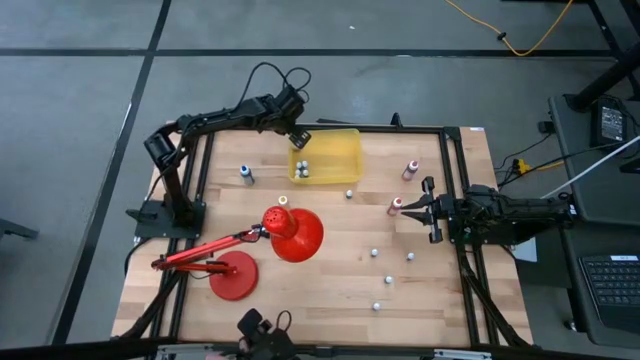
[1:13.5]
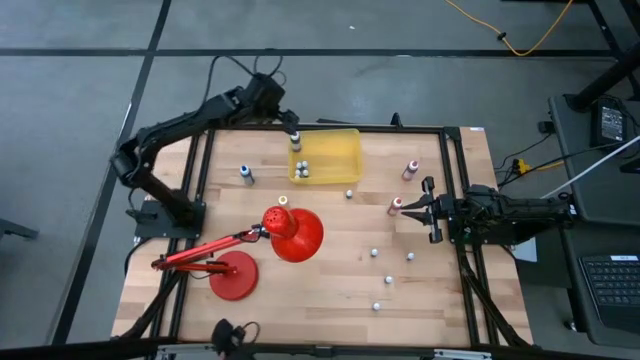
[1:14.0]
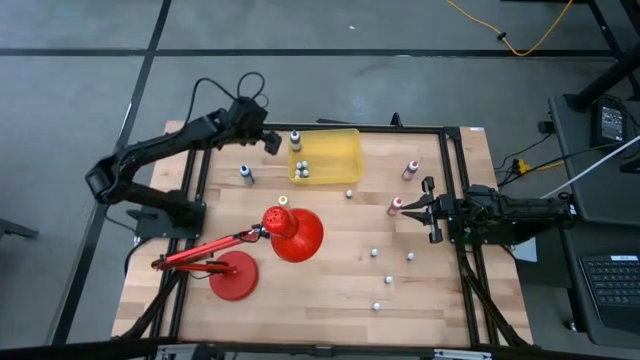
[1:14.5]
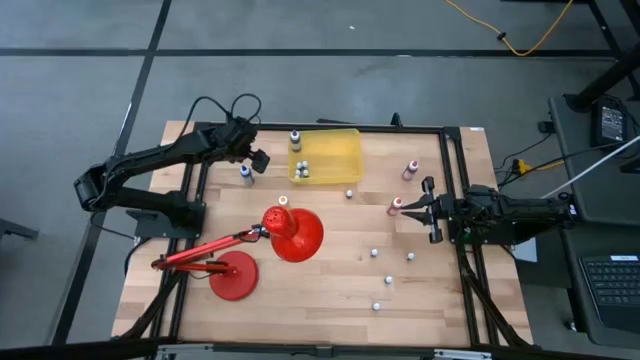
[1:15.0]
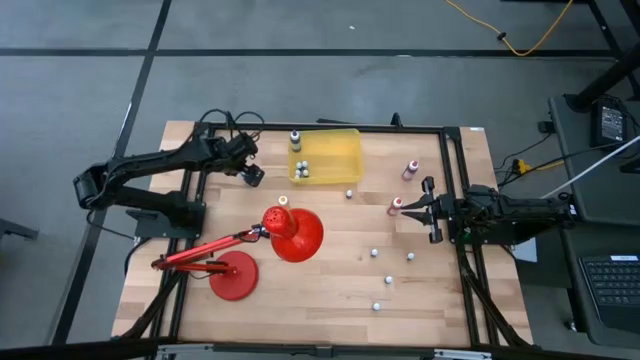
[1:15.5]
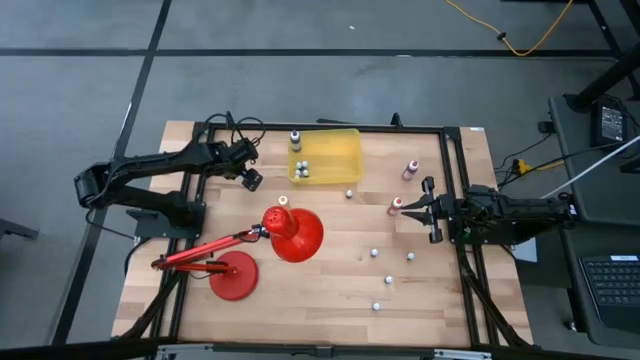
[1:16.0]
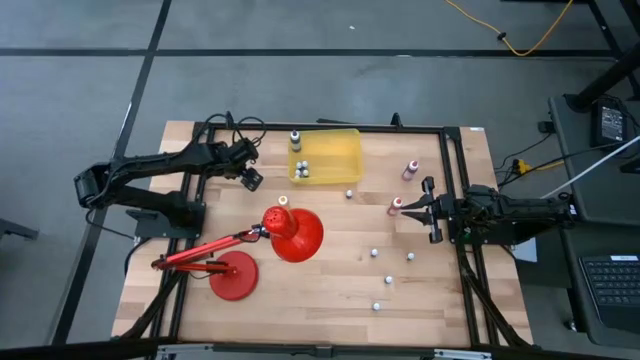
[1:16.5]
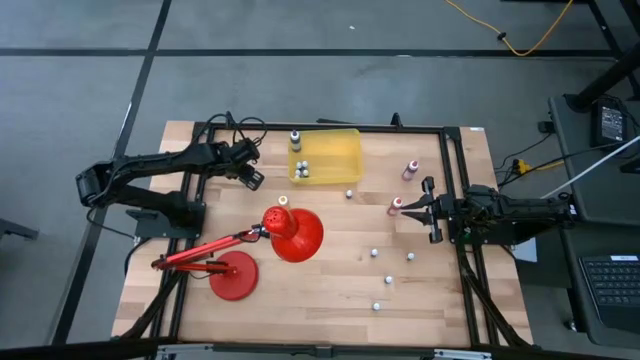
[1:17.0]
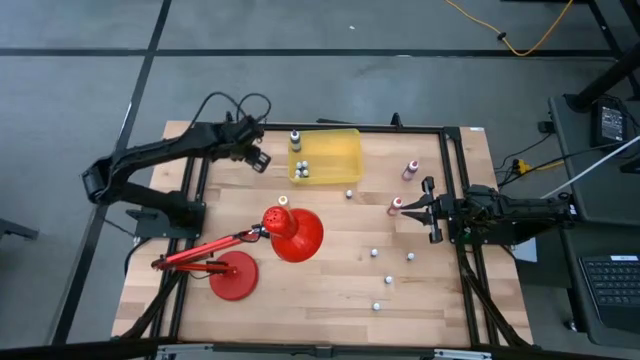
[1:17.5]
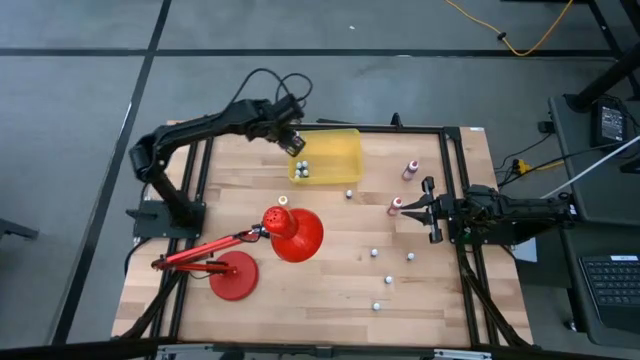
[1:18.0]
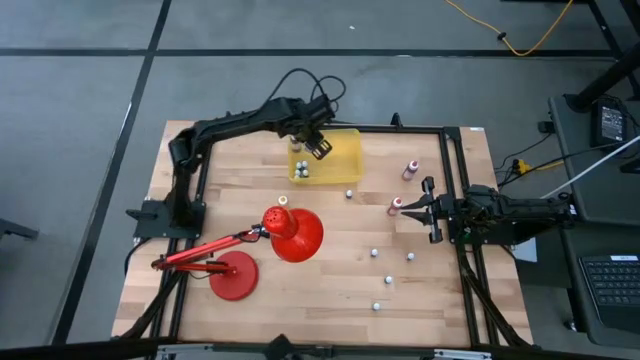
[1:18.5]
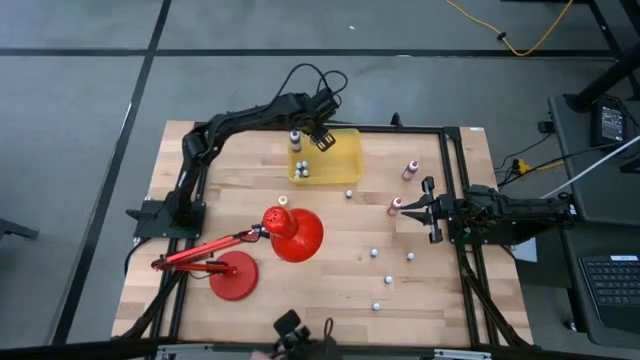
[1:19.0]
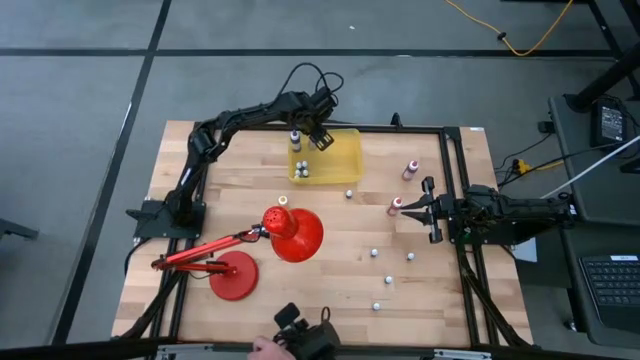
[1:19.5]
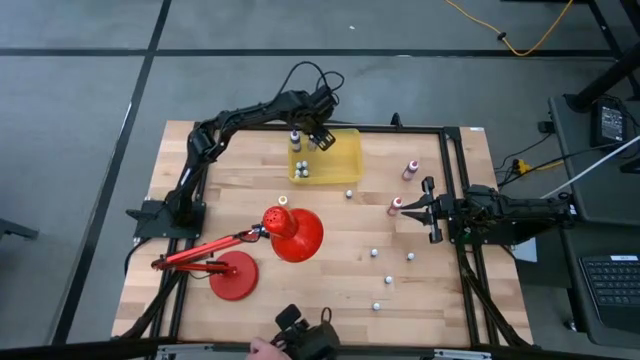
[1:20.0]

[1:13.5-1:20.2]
Task: Pick & Place food coloring
Put the blue food coloring bottle into the yellow bin

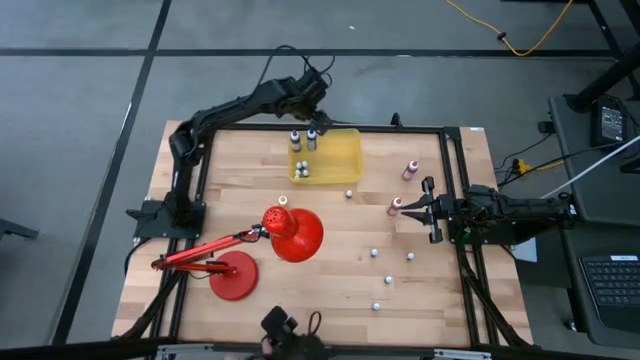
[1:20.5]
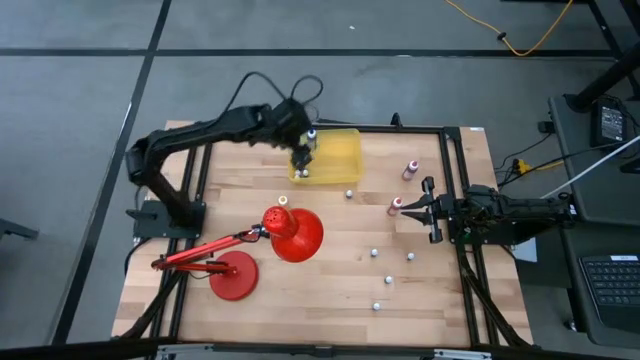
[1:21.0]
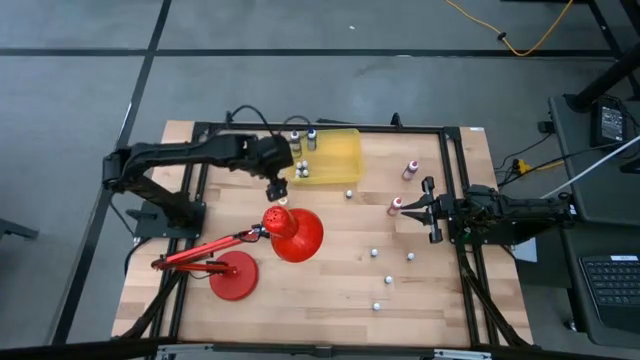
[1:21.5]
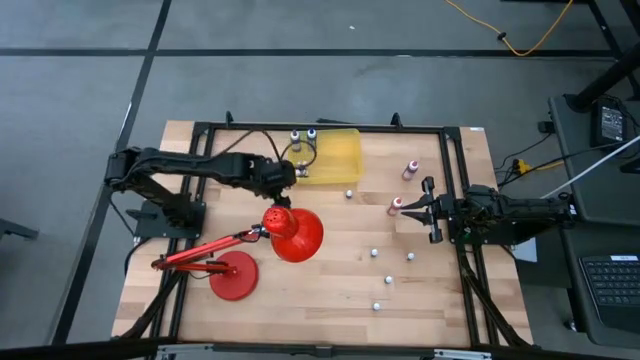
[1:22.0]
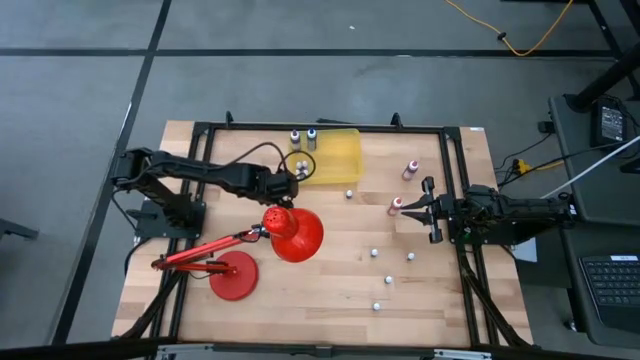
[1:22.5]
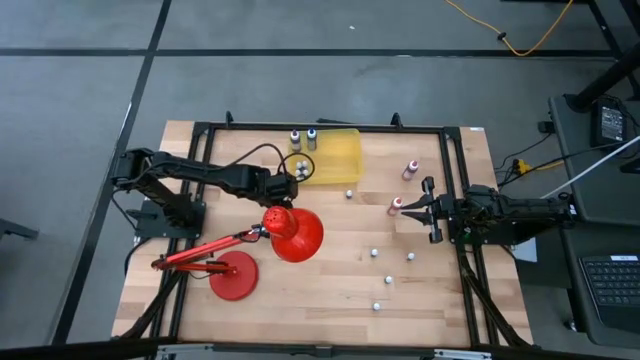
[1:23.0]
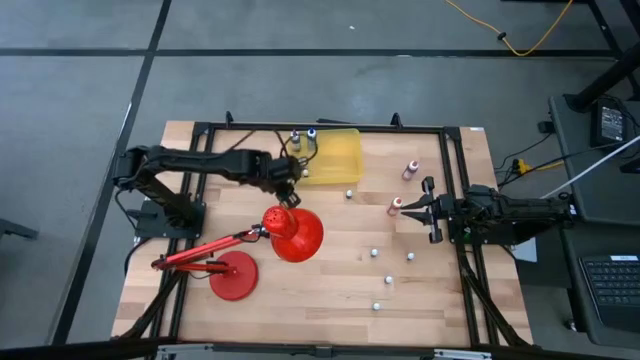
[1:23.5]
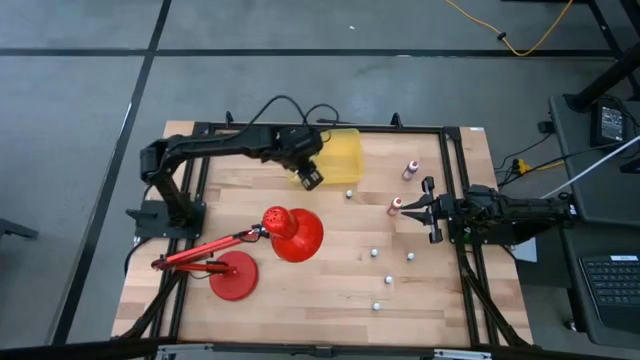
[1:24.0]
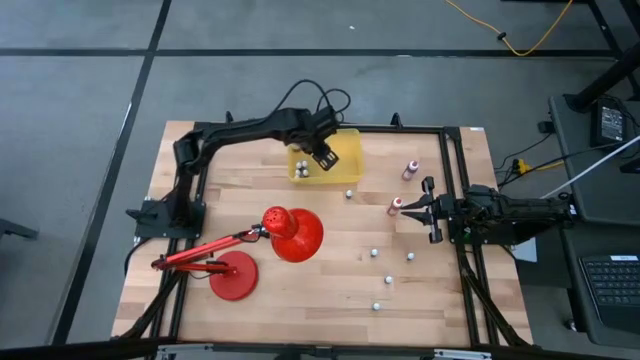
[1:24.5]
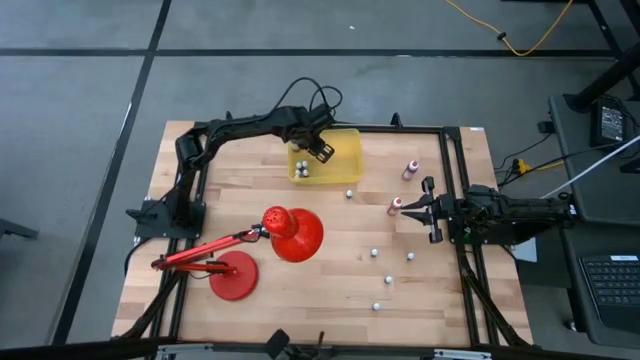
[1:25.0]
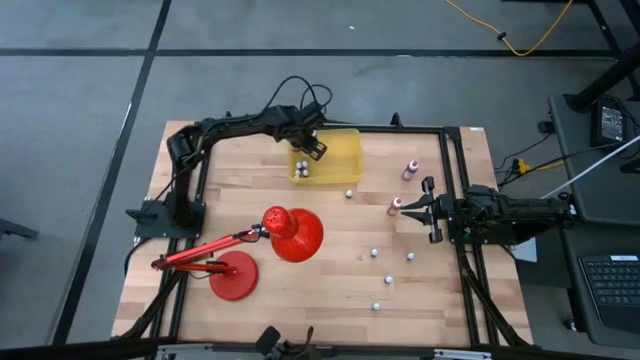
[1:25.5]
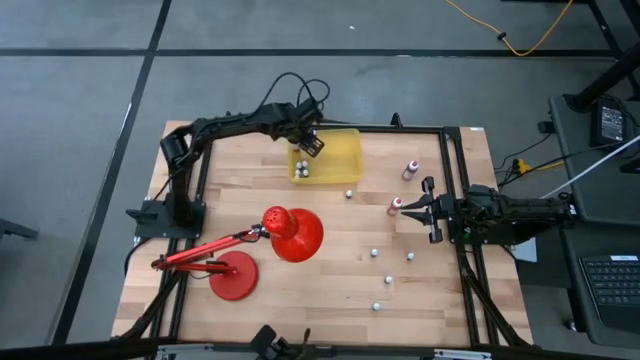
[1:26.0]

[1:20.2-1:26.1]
Put the yellow food coloring bottle into the yellow bin

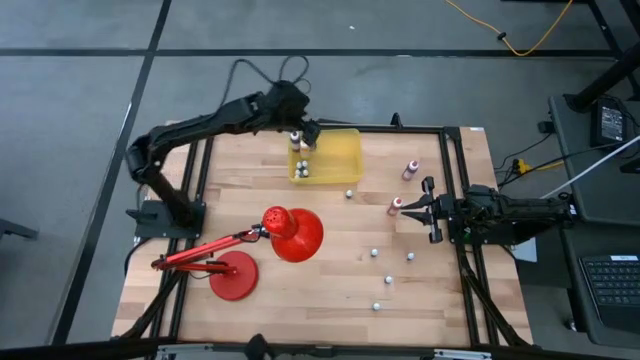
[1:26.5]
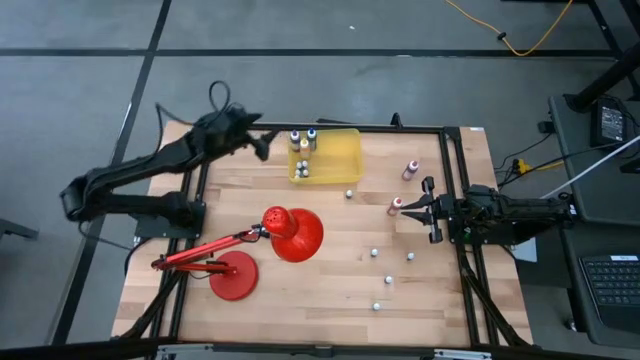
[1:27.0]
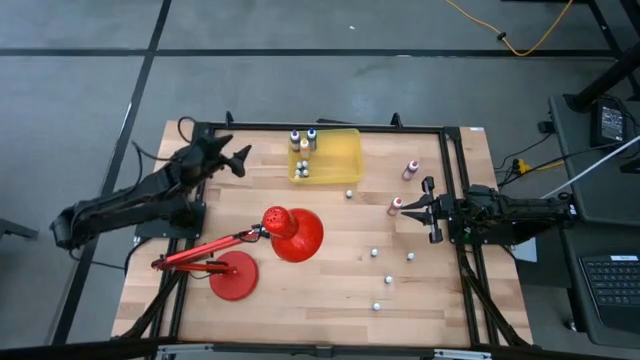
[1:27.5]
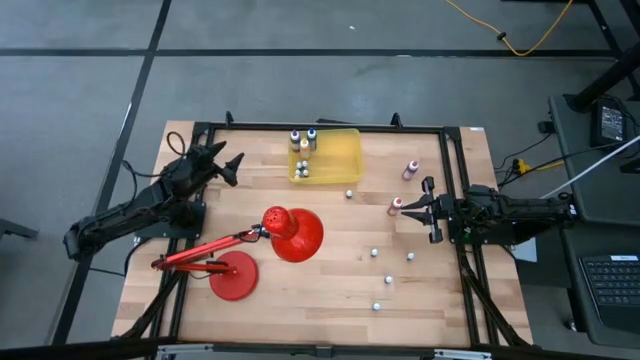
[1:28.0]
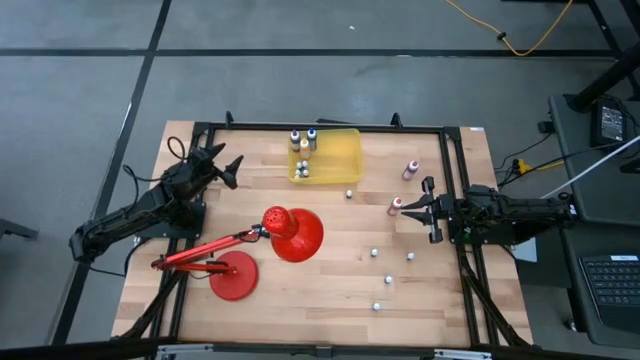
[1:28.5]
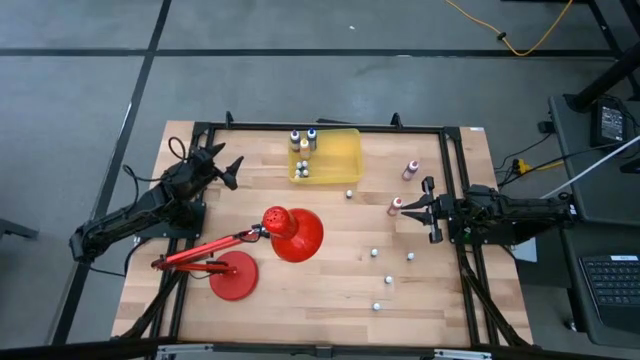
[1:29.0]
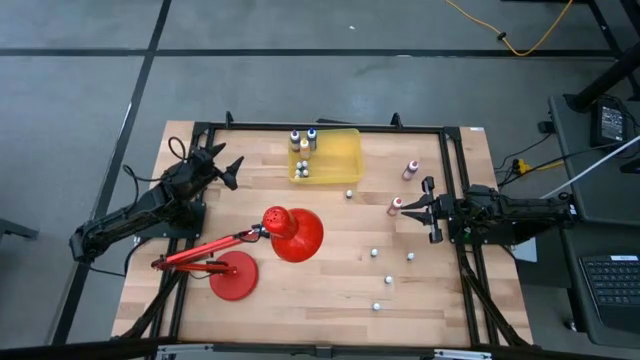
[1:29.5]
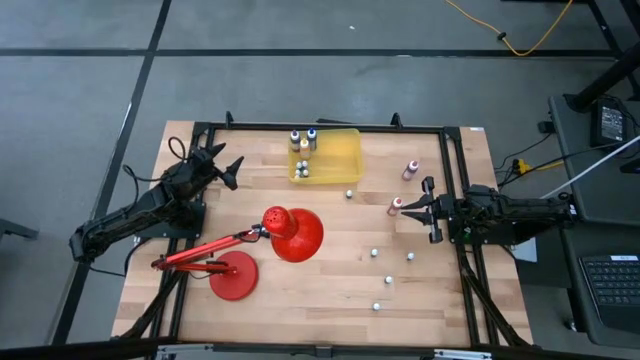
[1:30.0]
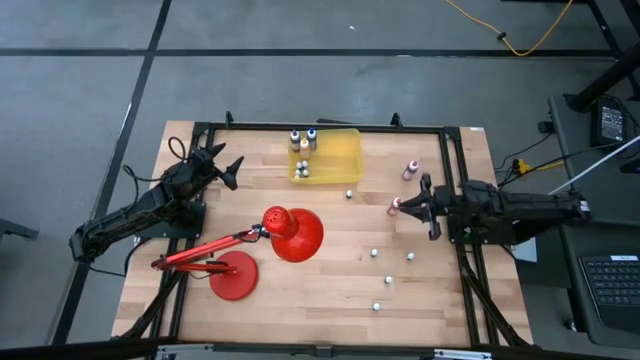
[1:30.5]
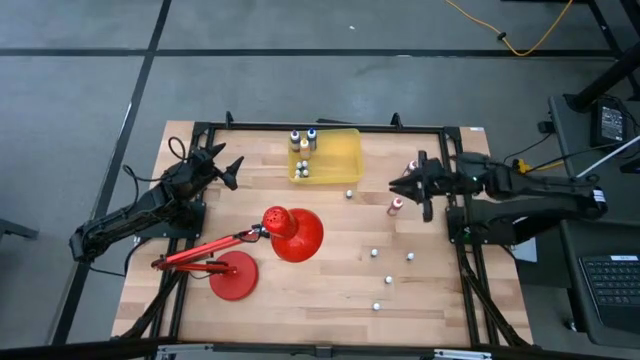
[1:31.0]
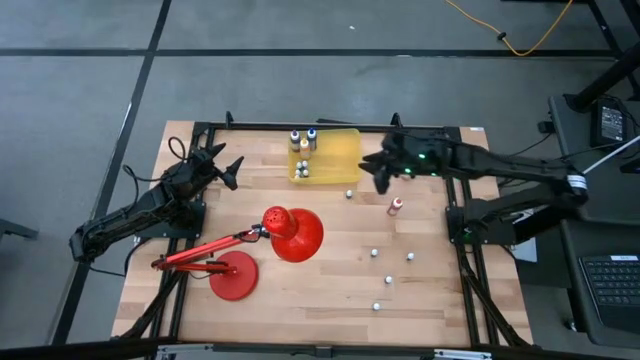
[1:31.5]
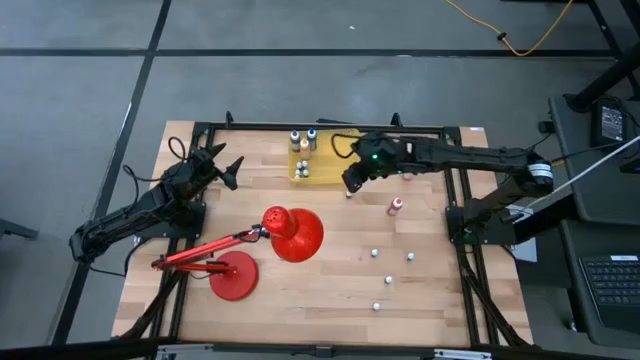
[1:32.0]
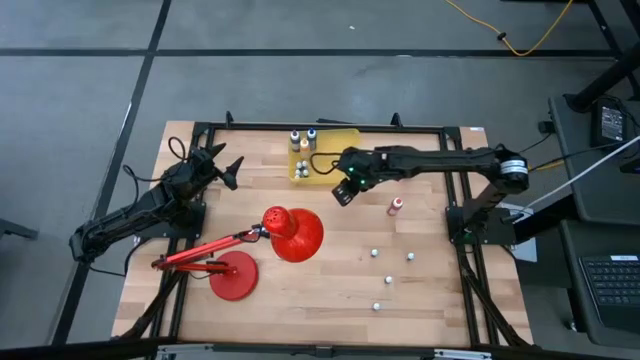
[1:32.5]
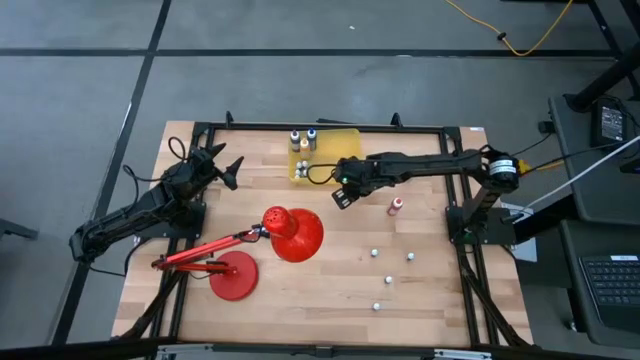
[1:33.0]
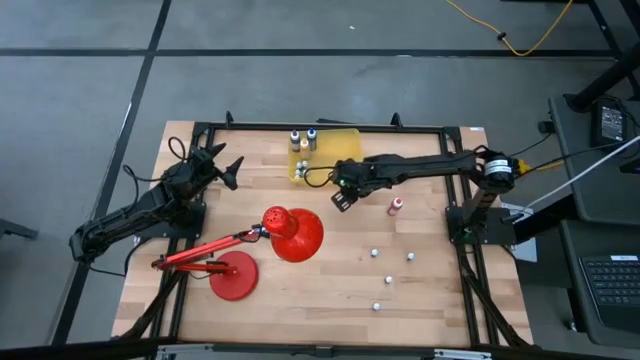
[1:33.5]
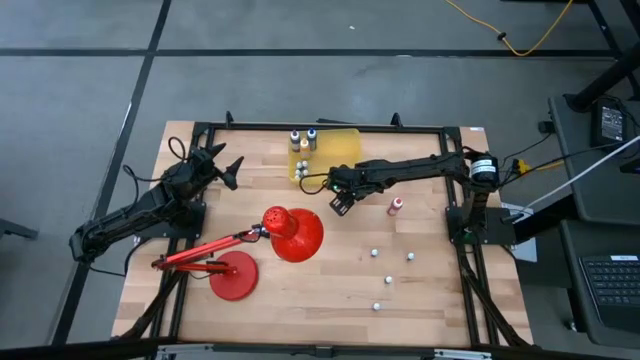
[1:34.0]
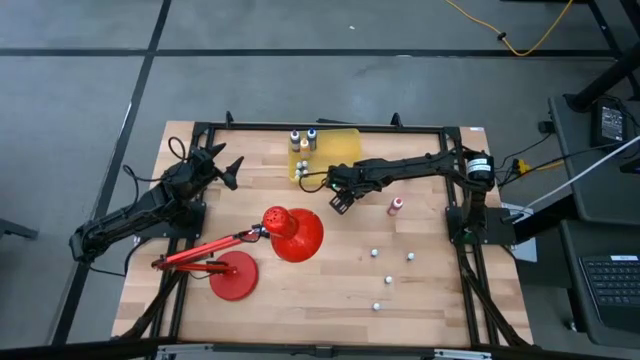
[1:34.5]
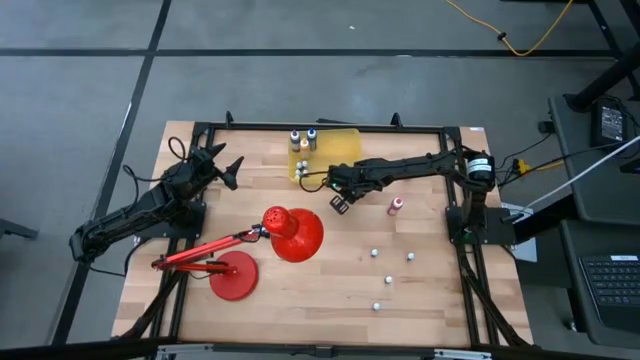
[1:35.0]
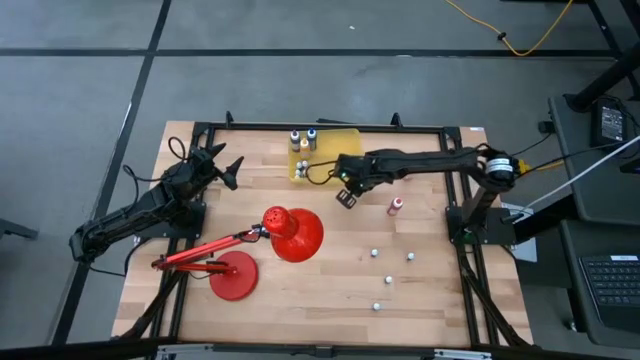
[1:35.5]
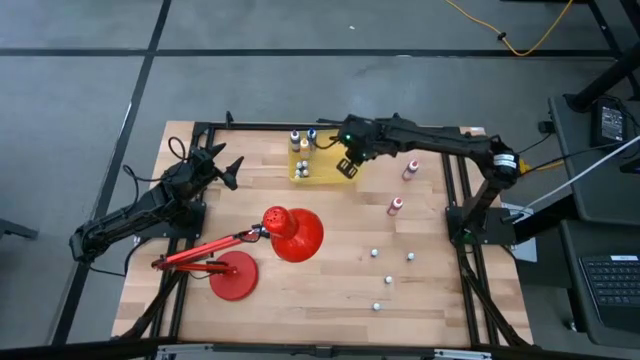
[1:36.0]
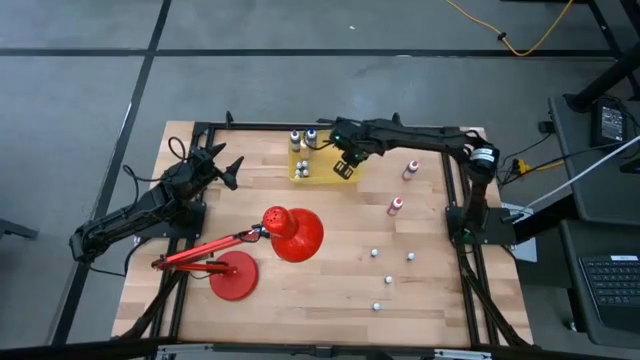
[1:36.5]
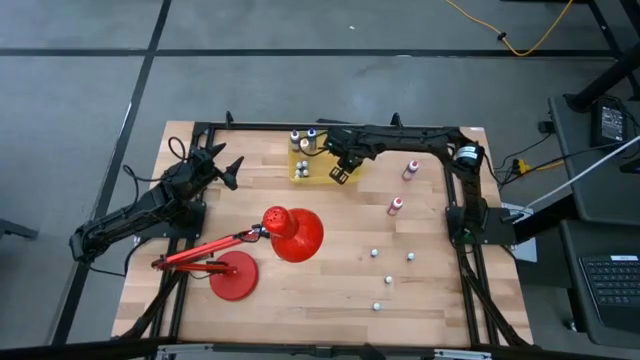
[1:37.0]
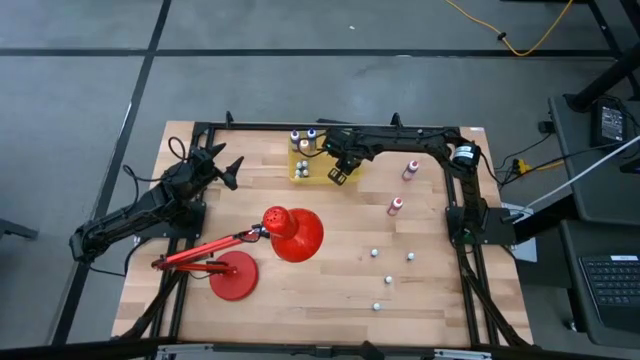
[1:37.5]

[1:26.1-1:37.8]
Put the green food coloring bottle into the yellow bin
